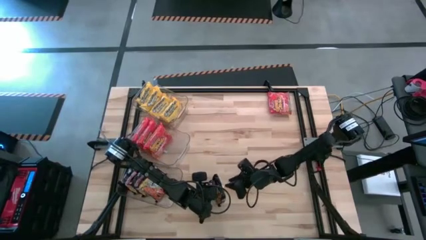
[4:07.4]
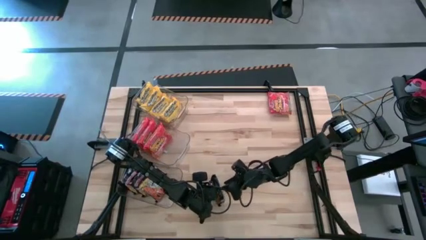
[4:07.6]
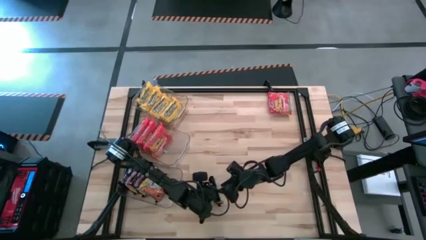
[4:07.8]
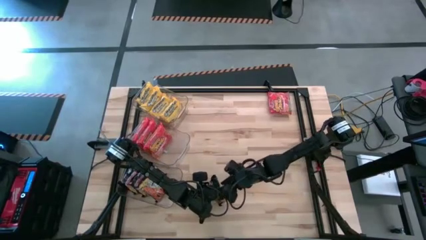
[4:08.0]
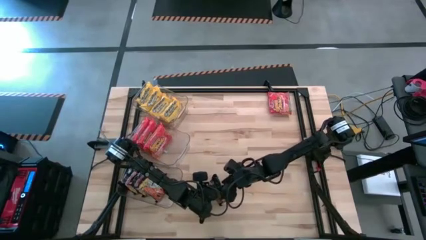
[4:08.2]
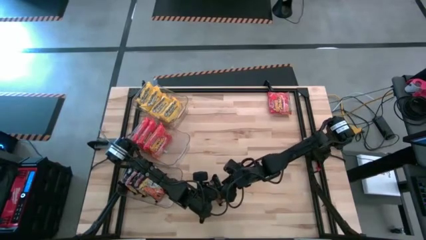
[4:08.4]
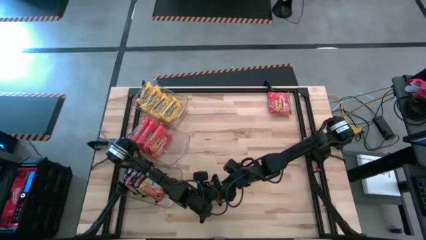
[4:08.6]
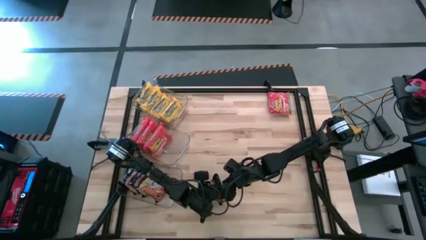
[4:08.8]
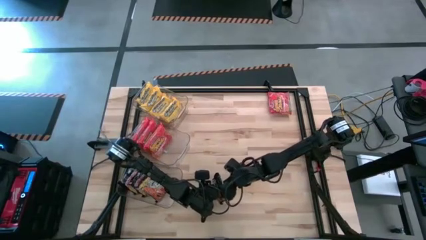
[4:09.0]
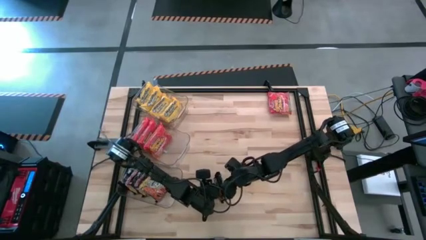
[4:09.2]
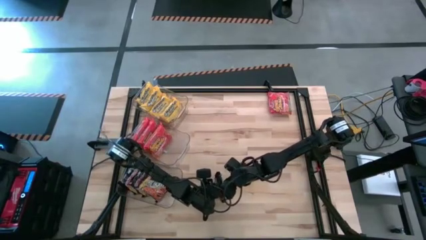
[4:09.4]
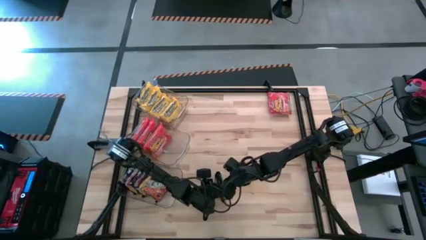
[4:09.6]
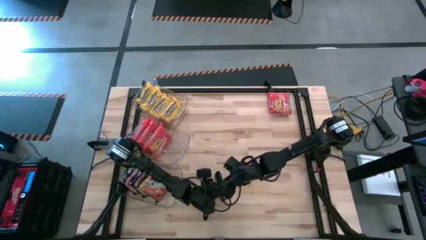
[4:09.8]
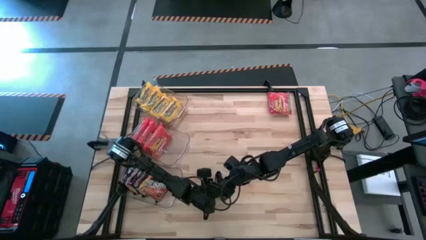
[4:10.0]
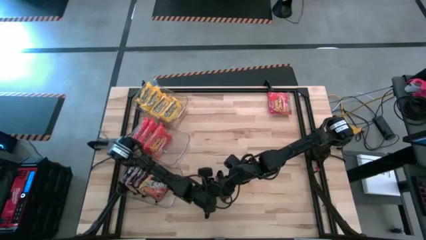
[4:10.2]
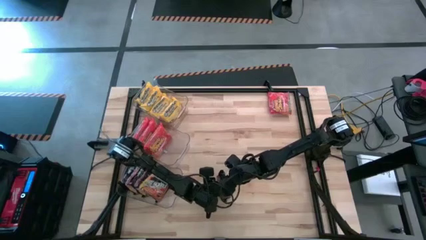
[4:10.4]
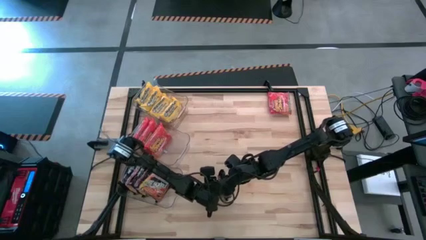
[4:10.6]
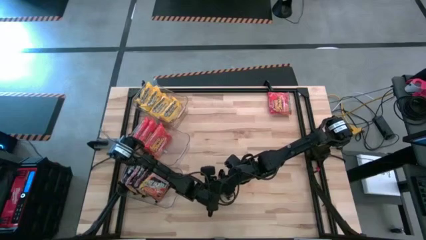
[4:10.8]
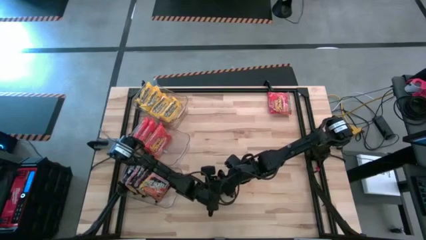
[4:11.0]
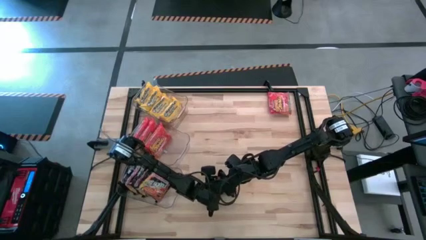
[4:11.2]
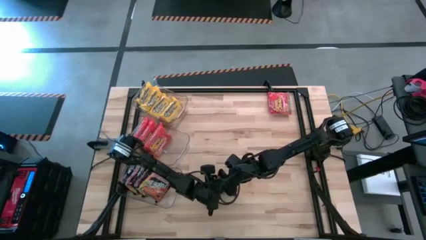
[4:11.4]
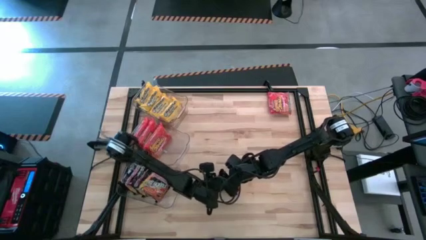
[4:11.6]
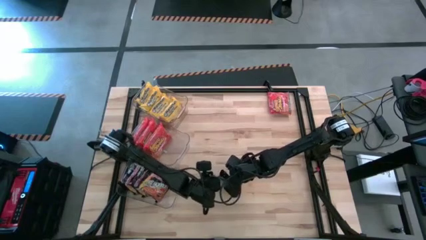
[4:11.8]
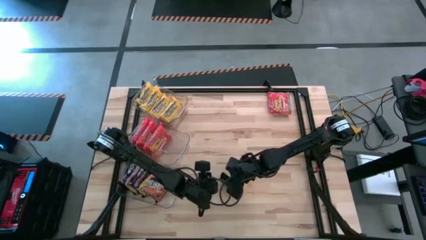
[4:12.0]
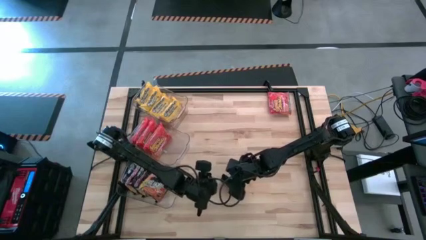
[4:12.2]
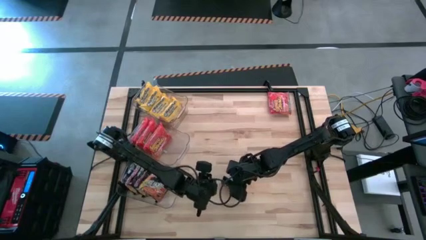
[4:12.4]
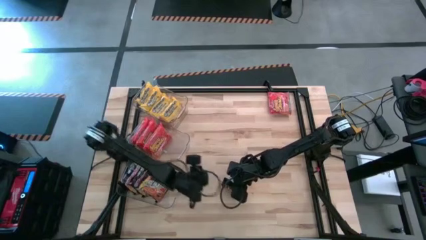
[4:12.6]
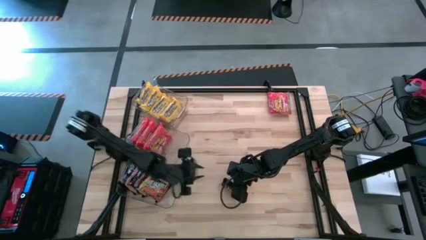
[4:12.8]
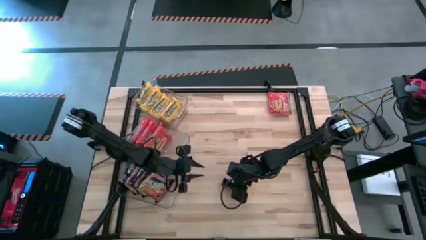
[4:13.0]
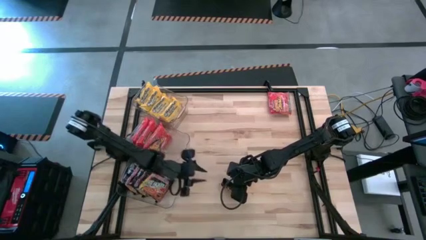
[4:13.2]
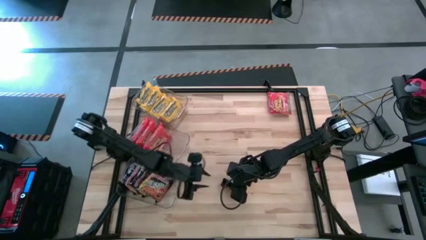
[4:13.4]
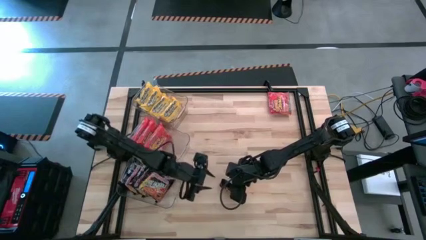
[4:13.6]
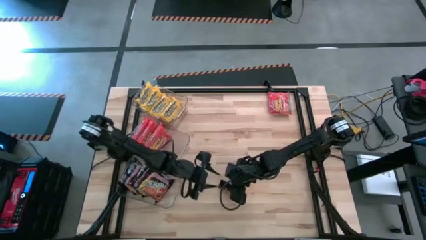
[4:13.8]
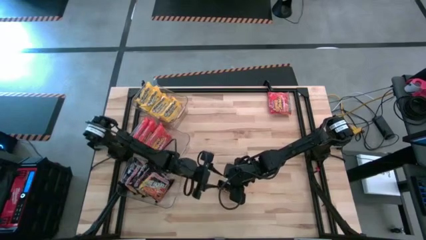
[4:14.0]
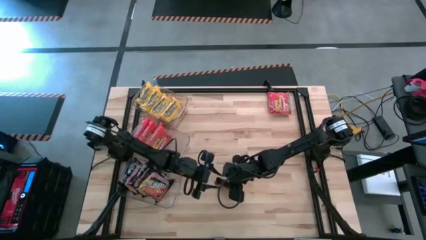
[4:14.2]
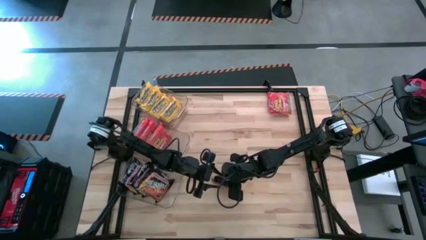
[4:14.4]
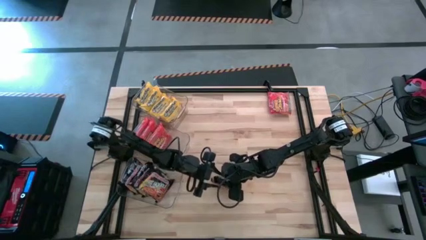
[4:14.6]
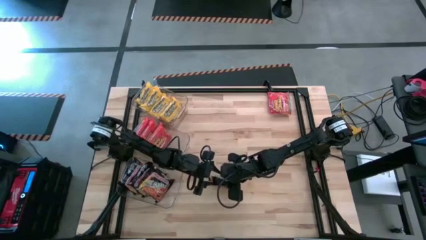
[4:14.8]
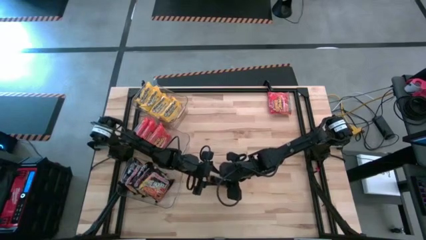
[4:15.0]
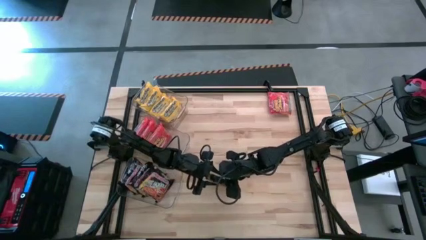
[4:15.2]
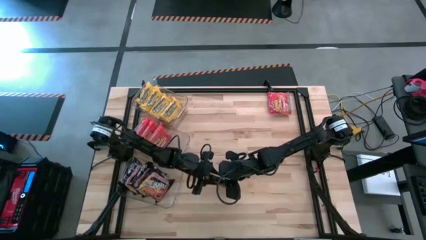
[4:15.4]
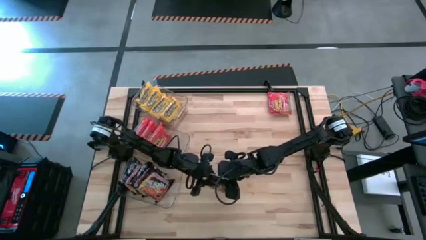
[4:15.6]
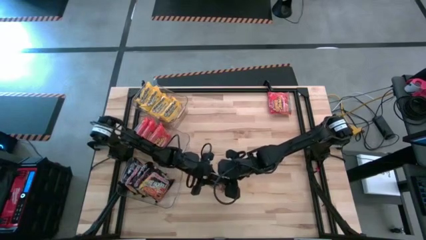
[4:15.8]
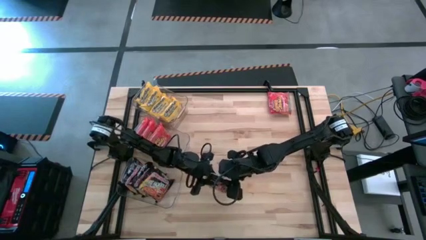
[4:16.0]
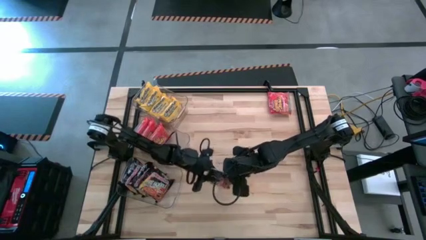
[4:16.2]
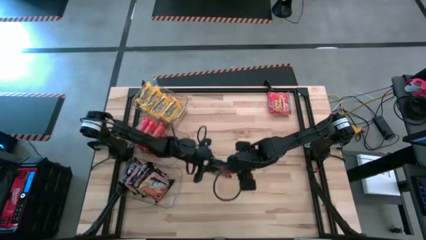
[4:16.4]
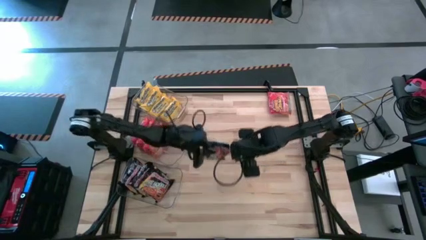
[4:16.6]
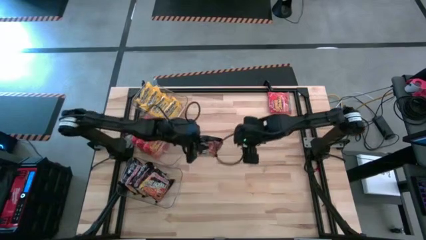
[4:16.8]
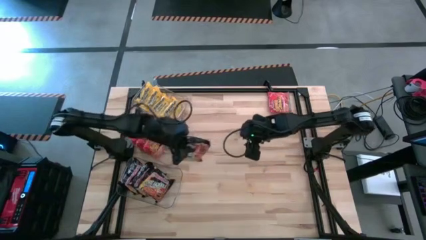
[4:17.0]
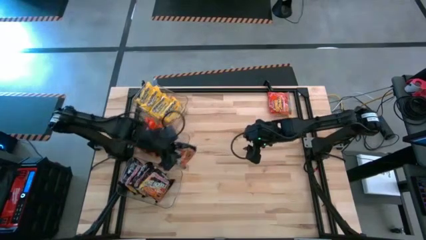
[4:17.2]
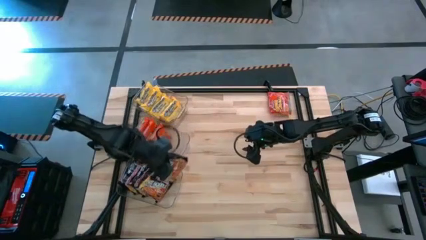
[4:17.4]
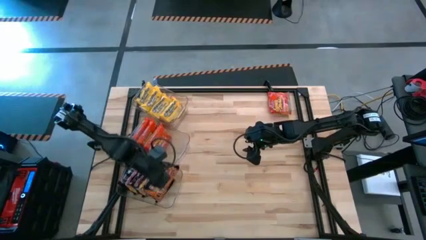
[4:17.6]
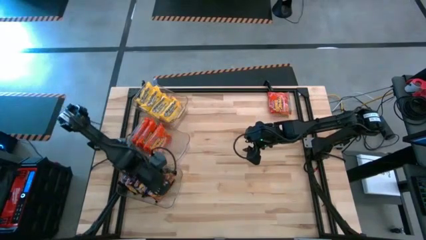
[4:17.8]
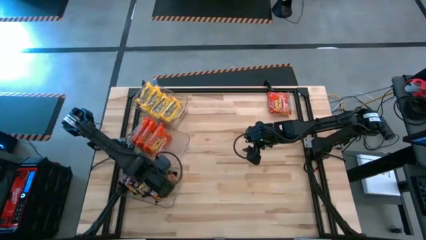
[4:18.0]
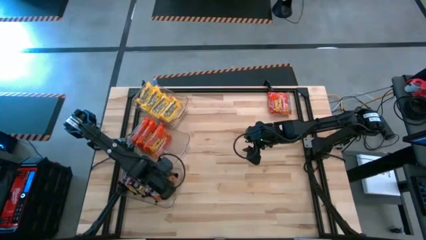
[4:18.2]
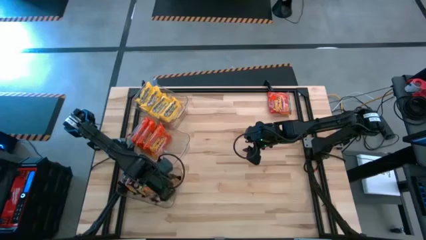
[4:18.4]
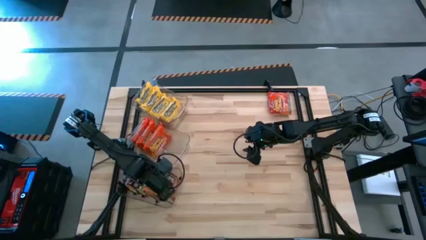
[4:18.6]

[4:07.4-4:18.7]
Task: Sort Maruchan noodles
Put the black noodles pack into the bottom transparent bin
